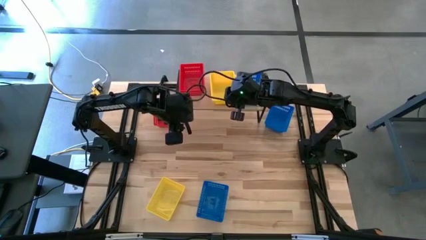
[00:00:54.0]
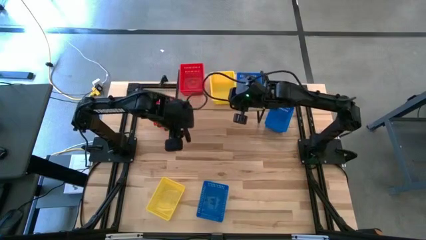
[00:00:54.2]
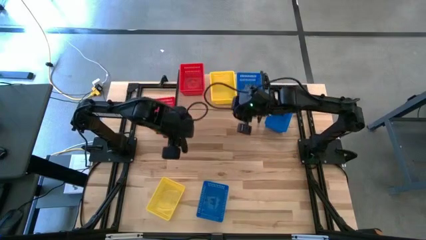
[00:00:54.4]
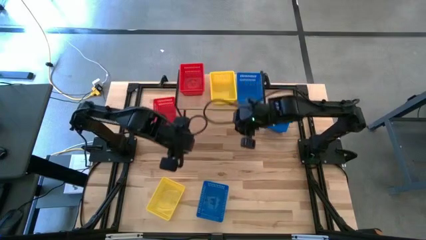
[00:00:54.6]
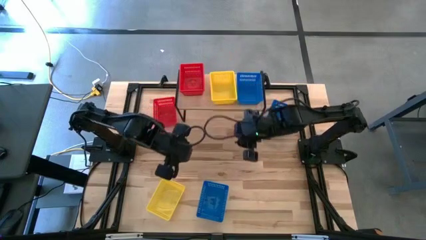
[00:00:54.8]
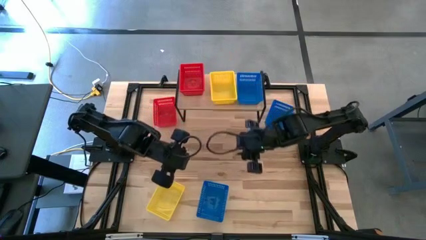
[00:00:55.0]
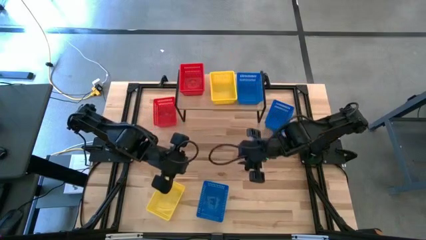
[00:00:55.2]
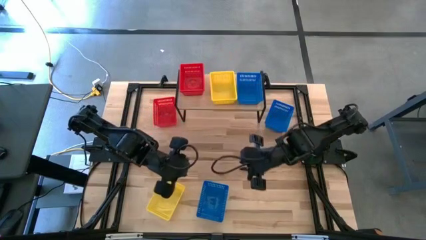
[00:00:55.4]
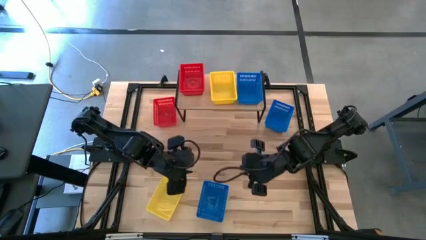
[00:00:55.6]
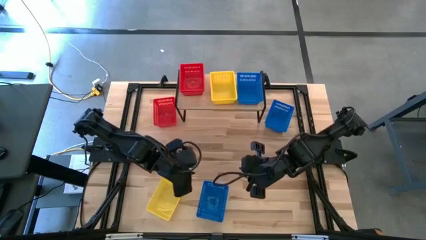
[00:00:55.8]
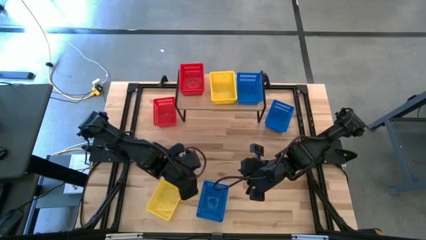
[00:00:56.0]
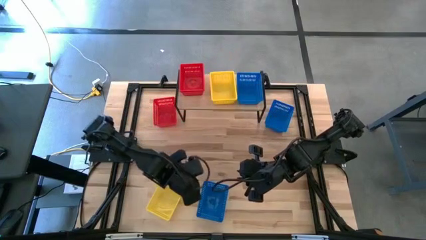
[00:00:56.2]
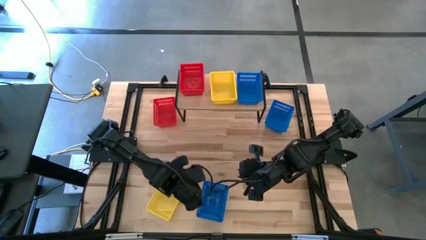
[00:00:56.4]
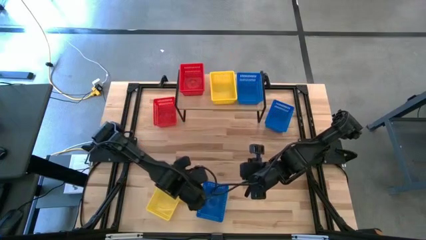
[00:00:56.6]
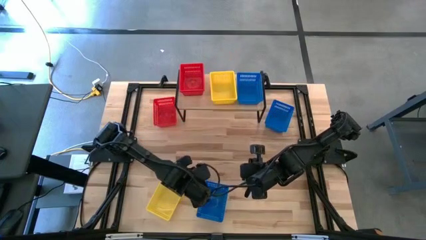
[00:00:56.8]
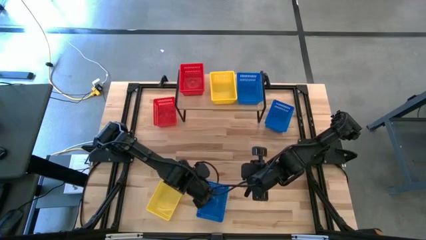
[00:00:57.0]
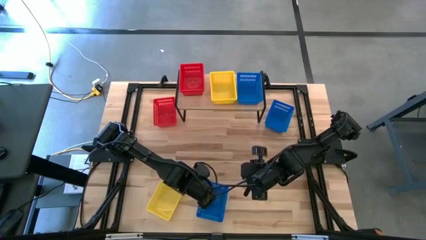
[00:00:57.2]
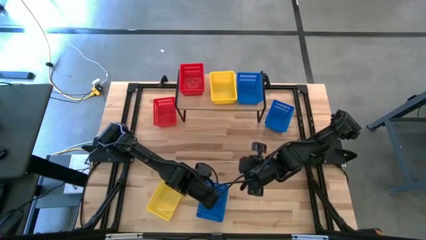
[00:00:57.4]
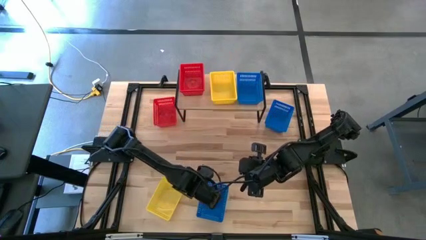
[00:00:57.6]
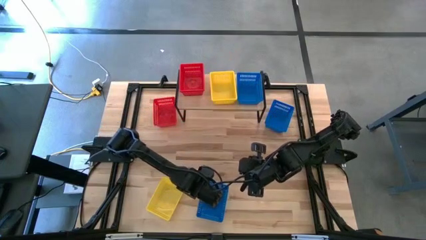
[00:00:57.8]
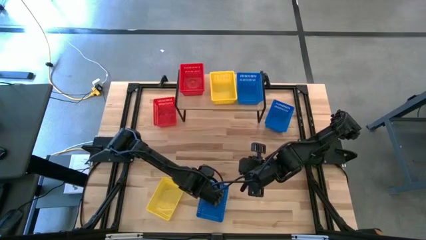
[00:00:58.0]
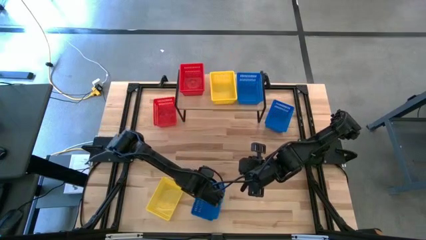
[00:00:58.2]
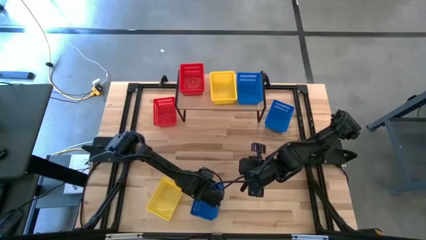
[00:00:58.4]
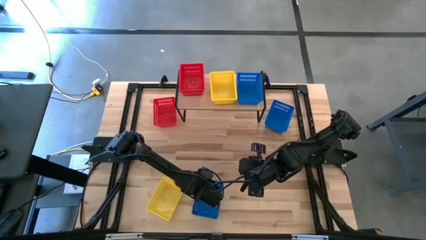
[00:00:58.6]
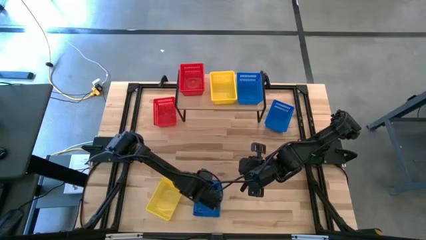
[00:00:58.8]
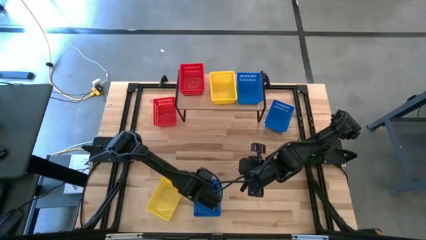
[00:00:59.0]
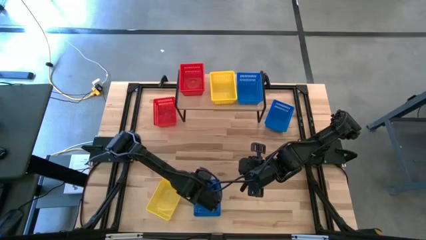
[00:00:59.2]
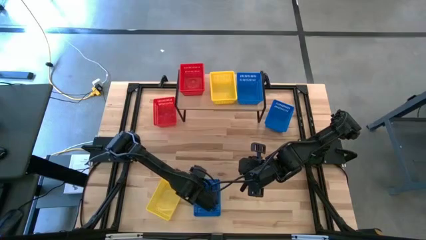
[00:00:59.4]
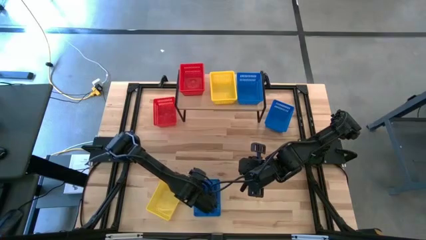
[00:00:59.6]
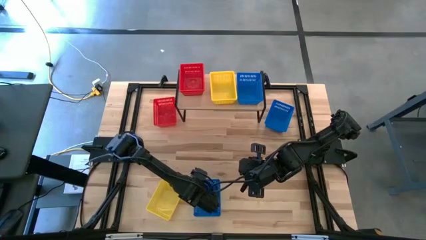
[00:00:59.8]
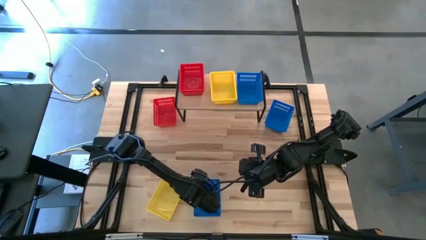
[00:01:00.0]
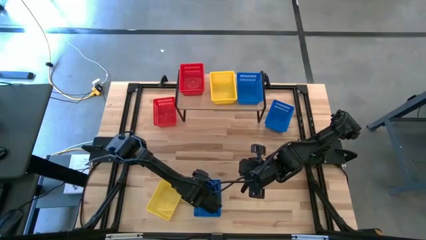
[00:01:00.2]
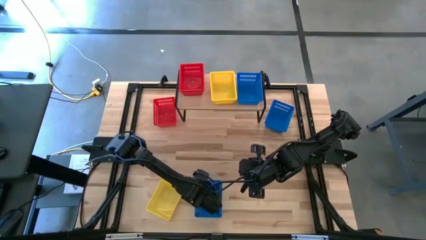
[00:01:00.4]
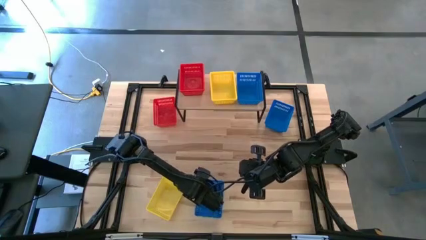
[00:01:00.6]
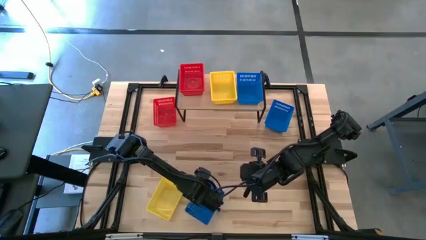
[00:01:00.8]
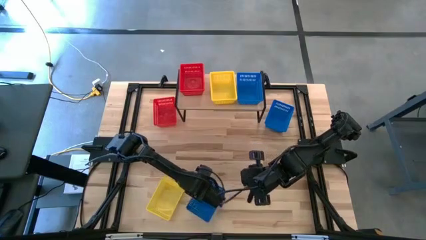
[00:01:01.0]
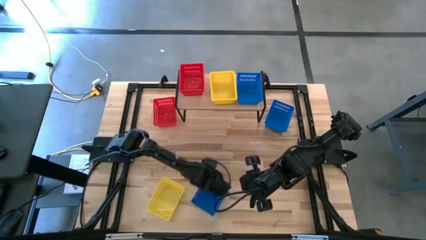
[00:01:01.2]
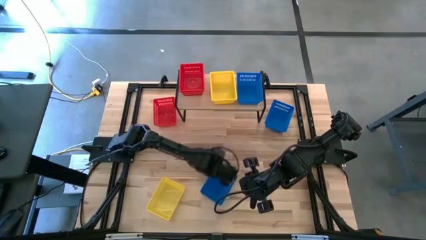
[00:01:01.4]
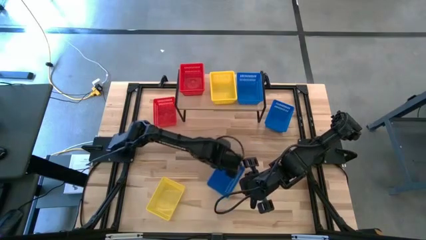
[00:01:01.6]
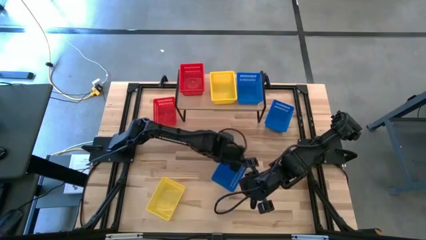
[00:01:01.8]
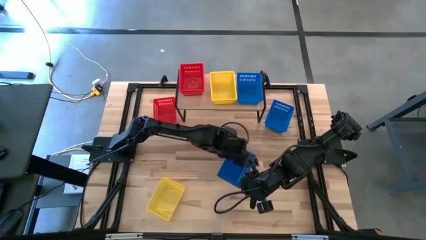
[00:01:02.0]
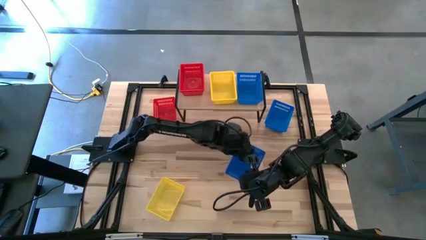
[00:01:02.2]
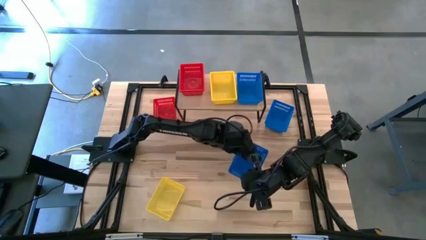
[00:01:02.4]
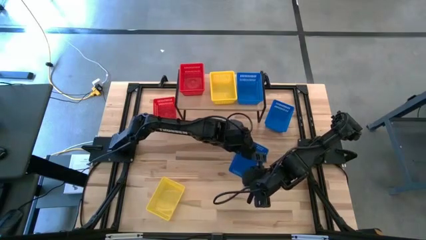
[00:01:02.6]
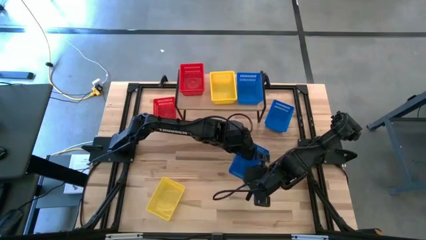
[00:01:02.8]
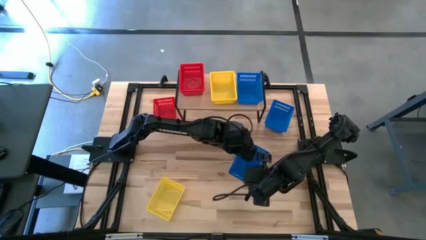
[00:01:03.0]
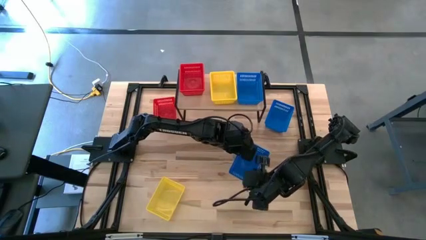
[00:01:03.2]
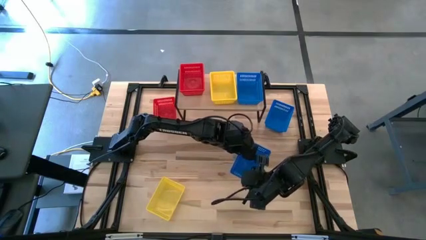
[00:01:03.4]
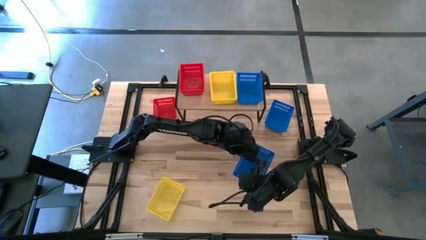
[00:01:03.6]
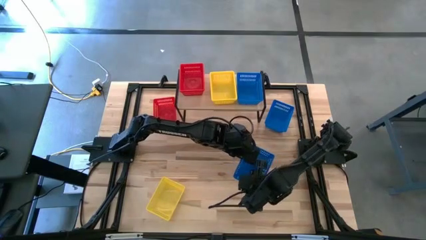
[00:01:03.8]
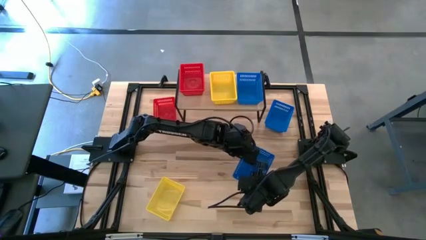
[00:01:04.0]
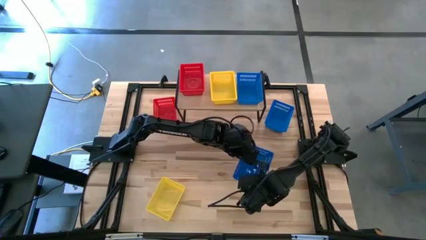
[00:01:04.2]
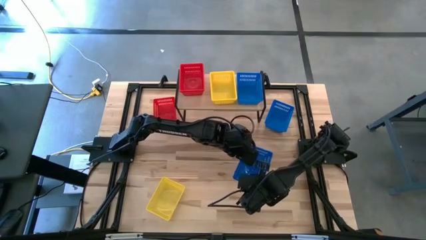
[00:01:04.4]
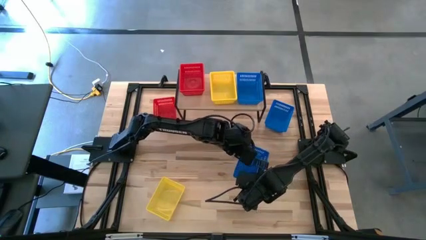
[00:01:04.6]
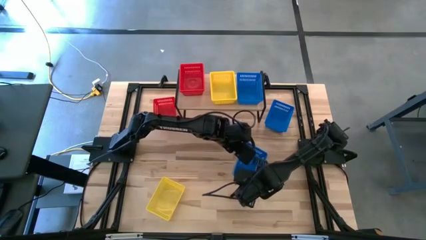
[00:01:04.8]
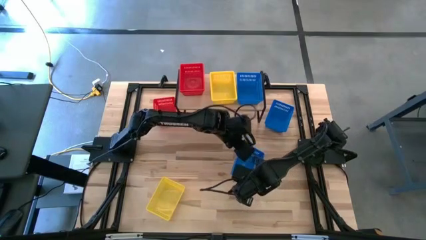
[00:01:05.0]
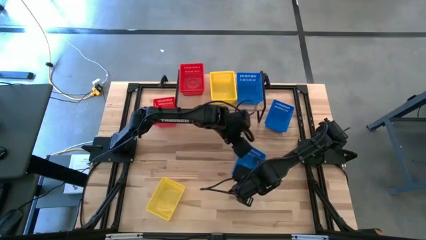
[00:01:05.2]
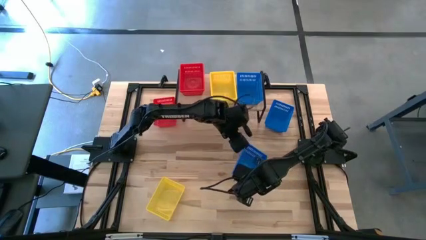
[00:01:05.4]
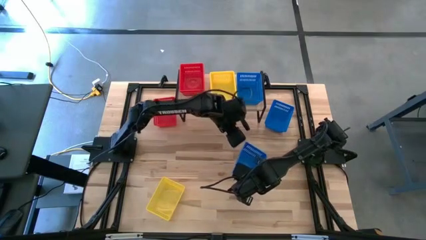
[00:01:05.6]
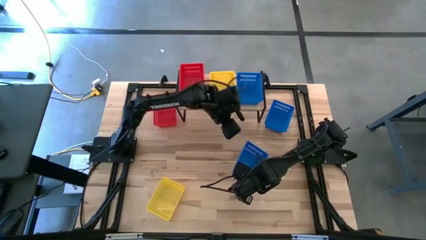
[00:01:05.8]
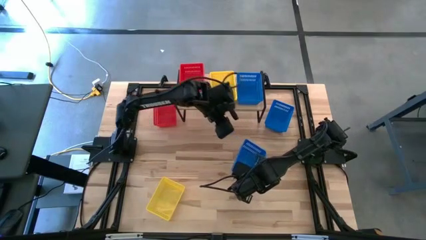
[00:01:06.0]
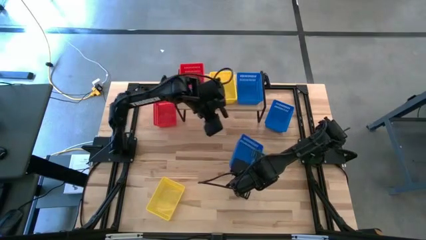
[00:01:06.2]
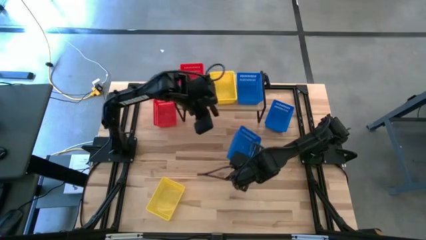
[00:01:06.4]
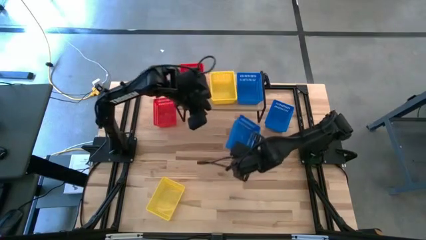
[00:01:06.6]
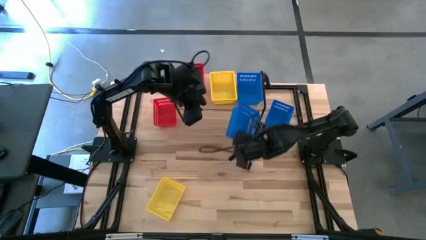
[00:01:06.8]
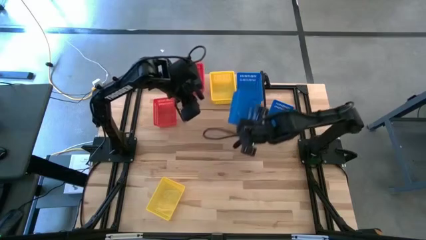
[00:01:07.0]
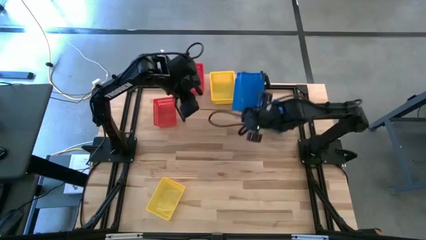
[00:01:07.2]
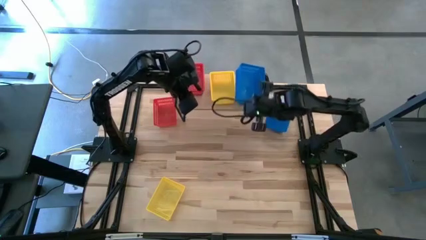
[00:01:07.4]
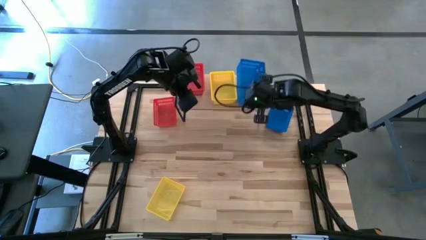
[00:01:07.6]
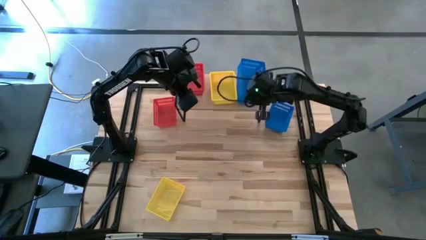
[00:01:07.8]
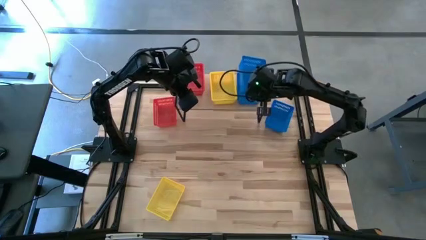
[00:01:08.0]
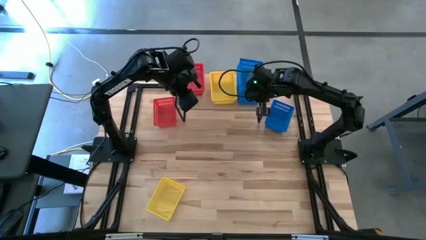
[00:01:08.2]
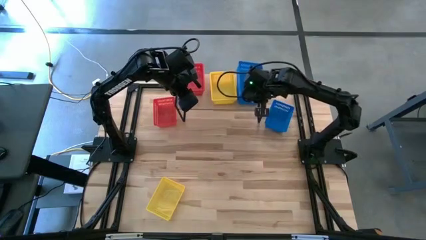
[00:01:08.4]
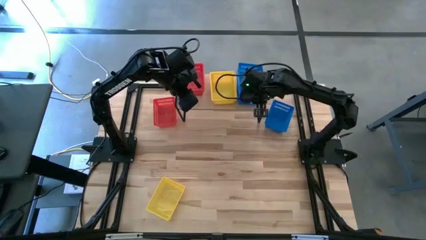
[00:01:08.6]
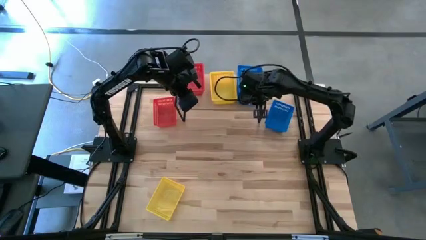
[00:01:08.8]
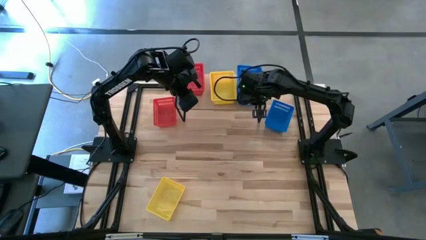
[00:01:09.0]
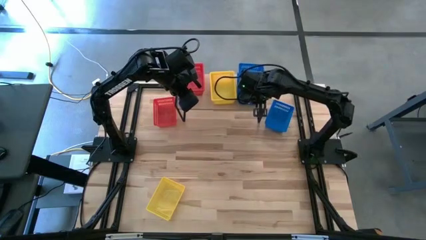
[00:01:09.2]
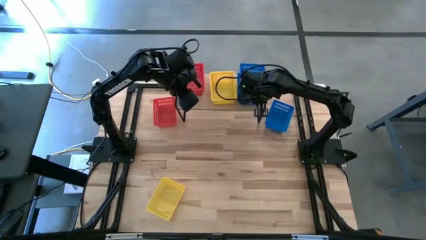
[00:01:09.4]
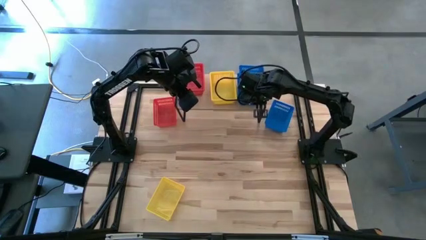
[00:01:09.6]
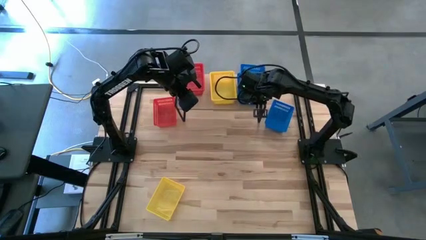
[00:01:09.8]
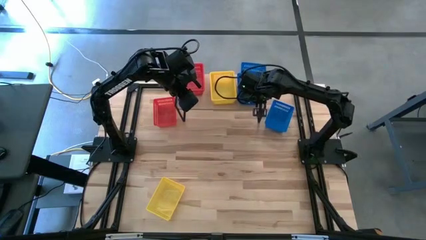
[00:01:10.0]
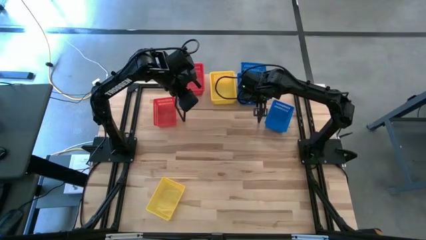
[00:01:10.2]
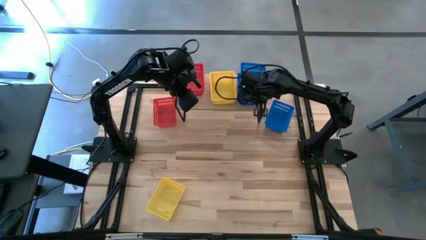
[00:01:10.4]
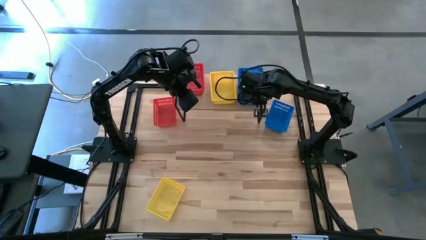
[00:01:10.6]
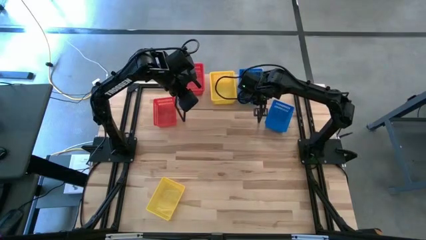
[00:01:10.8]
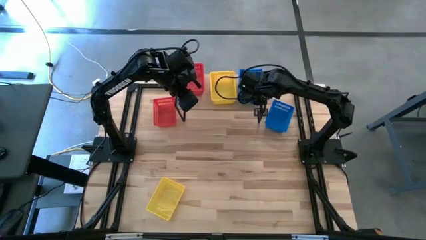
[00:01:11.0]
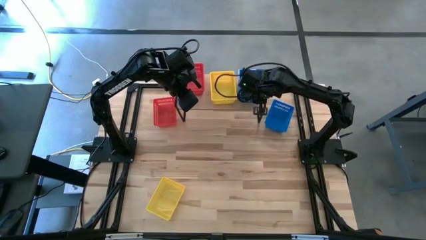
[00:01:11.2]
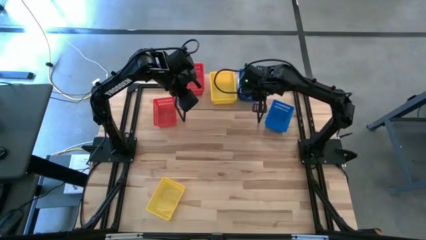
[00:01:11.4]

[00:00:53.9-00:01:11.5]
Task: Stack baskets on shelf by color
Stack the bottom blue bin on top of the blue bin on the shelf
